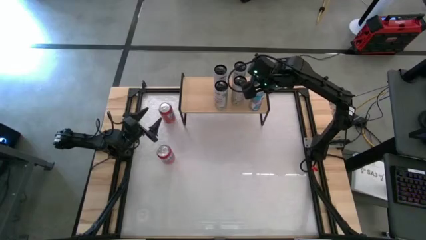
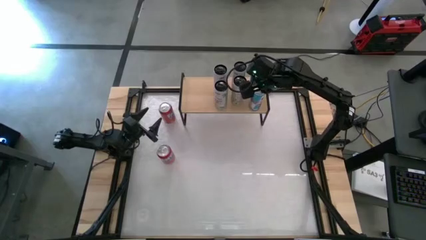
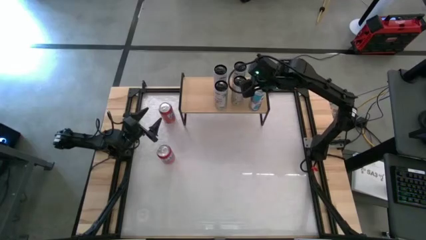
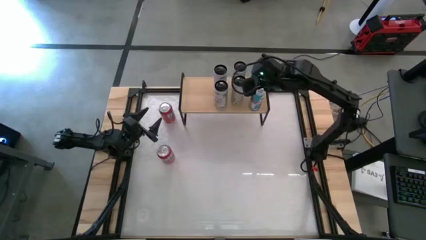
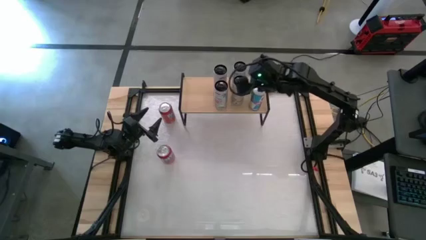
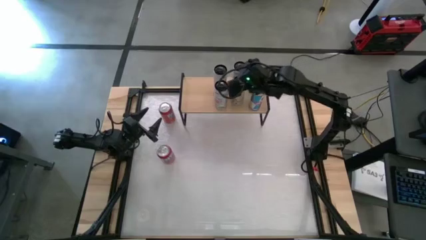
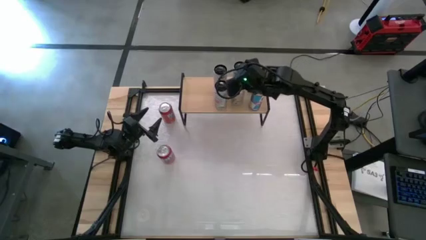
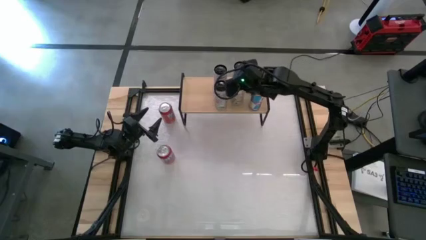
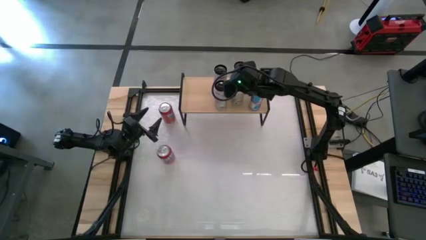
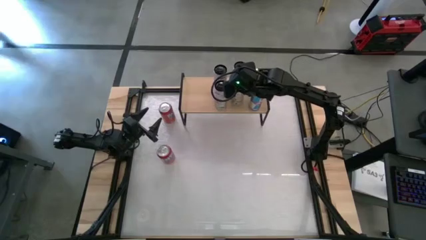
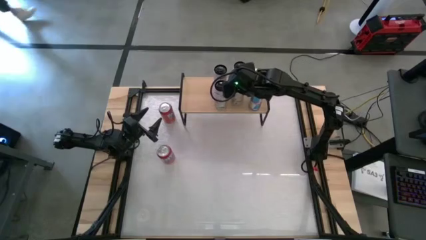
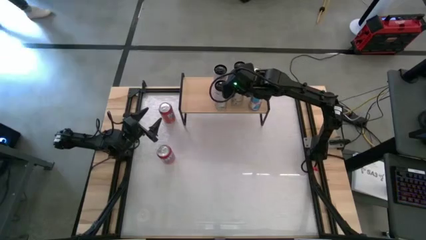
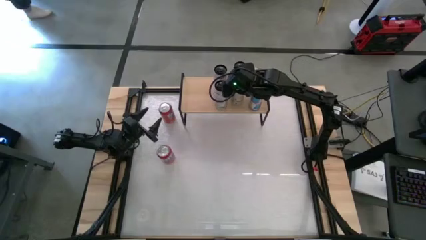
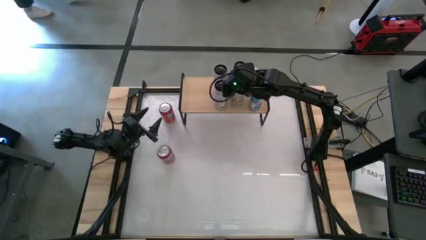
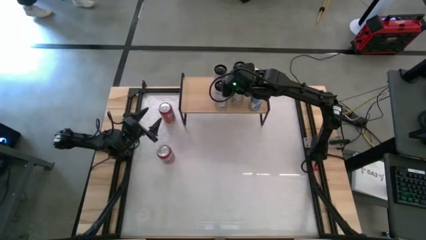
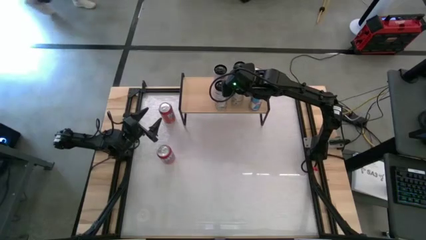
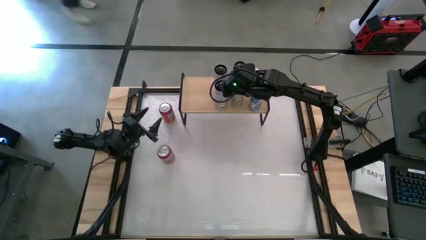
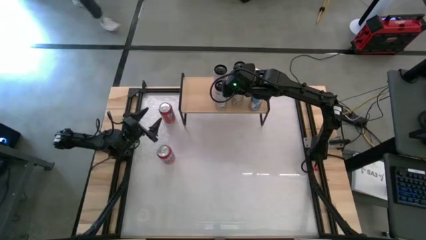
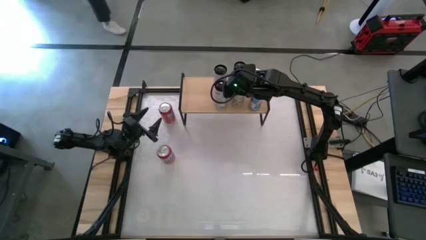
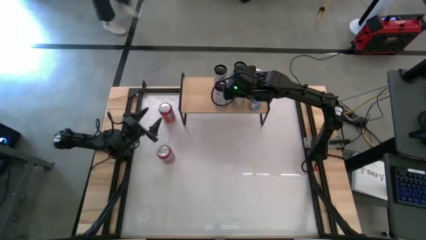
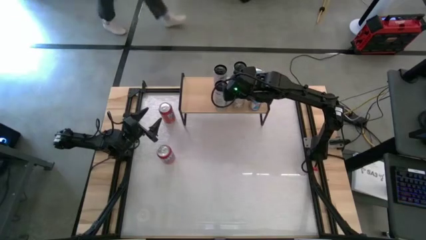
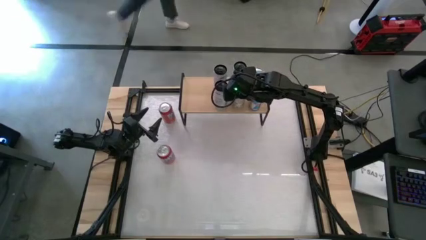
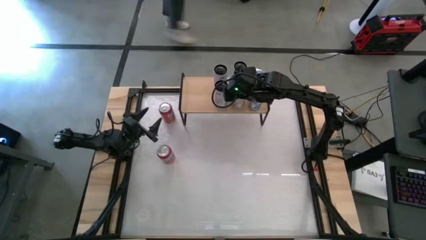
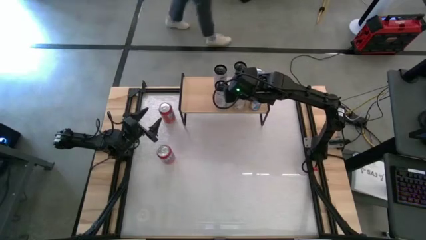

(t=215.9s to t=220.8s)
Task: Place canned beverage on shelf
Adjust the white yellow soda can

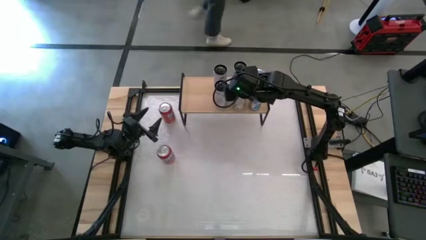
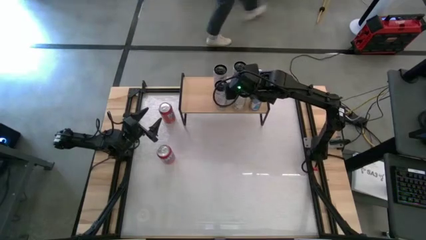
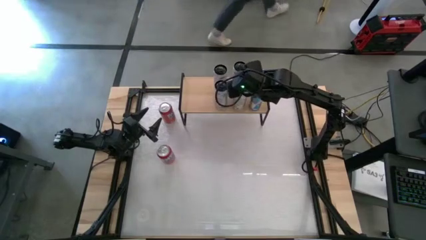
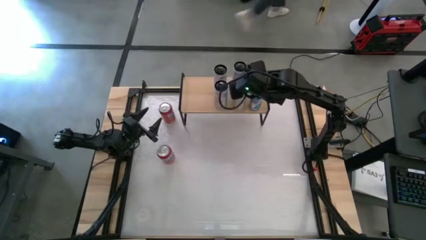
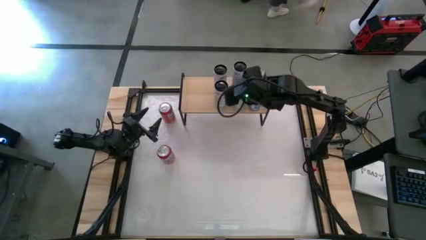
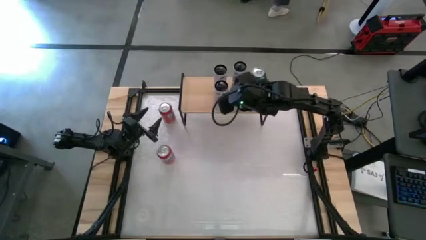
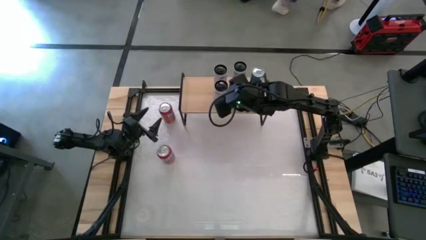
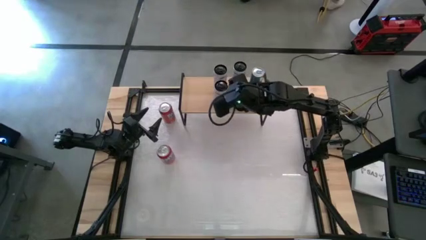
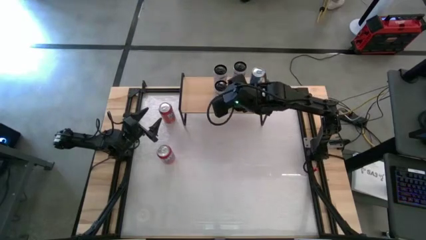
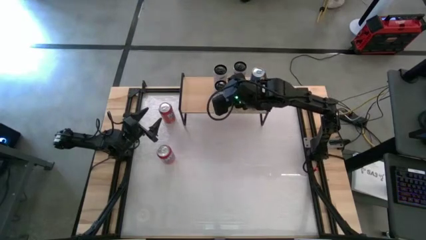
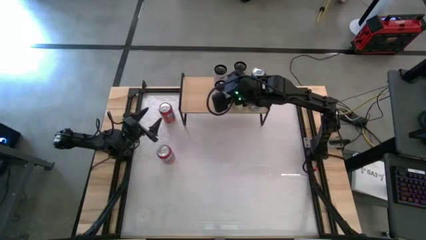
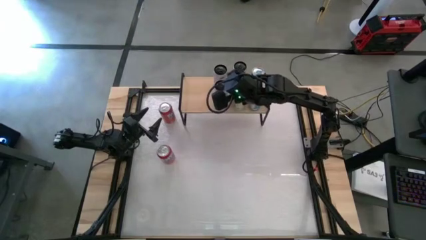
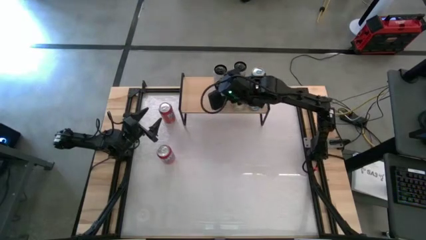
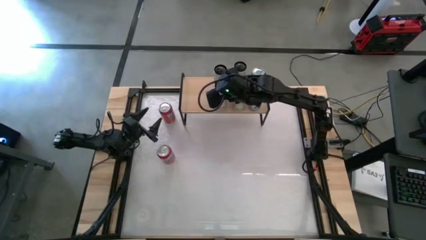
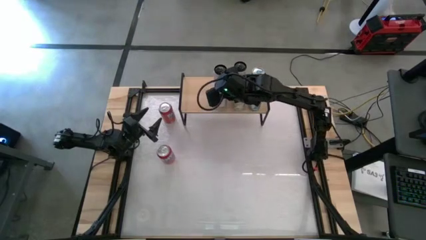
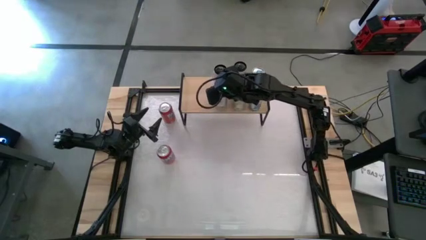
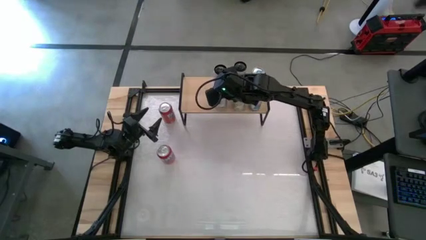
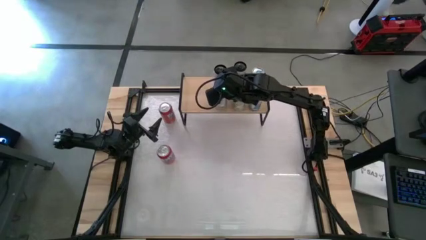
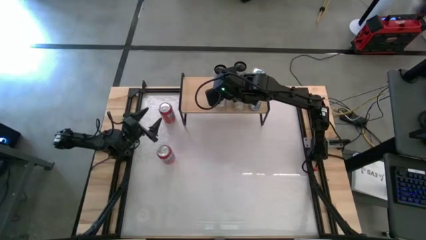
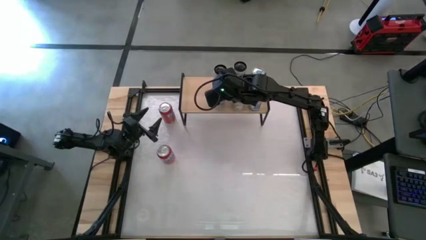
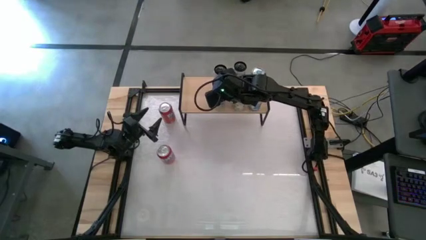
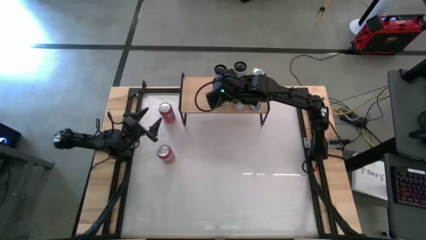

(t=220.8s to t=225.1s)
Adjust the white pink soda can

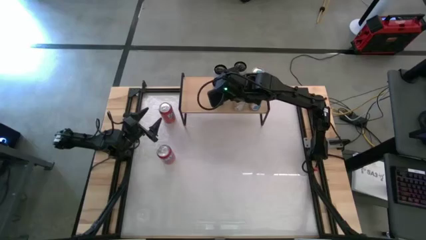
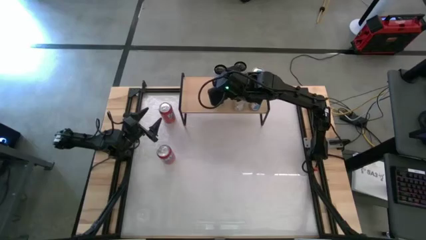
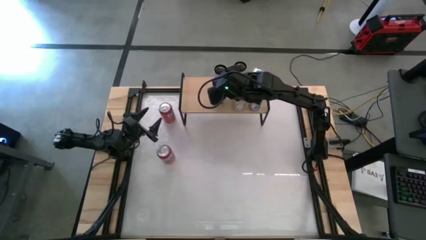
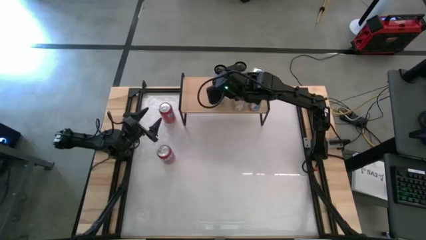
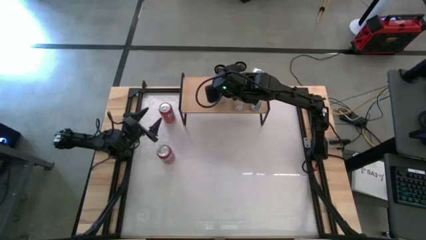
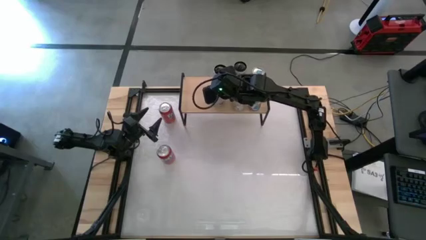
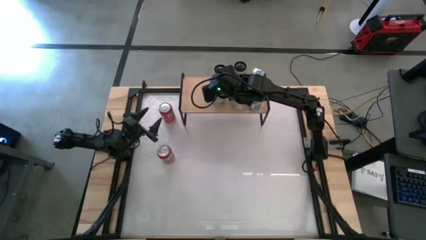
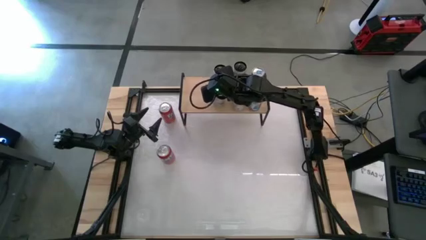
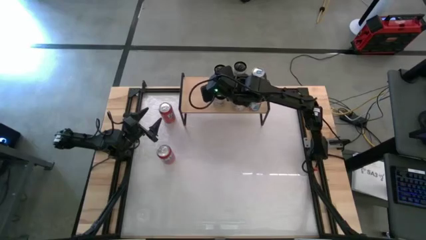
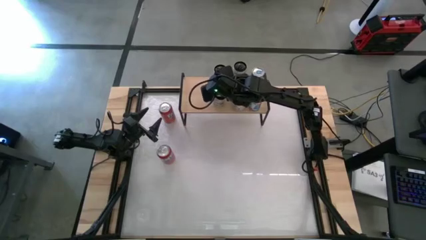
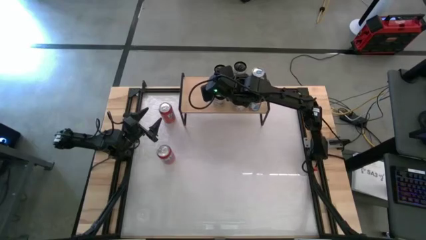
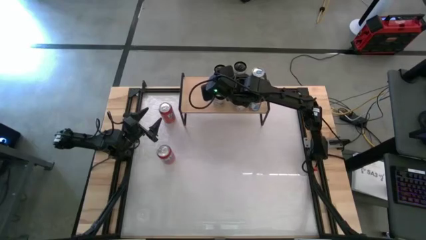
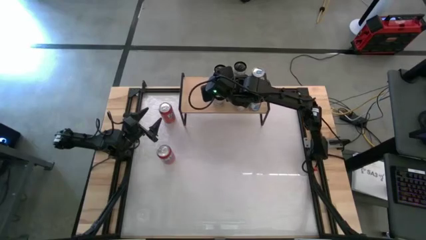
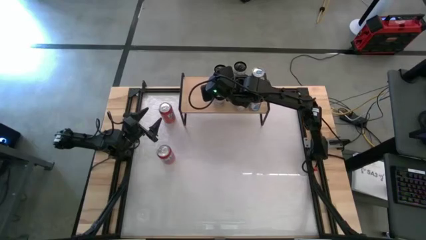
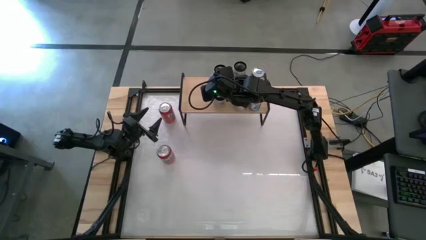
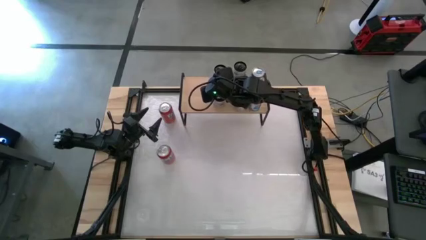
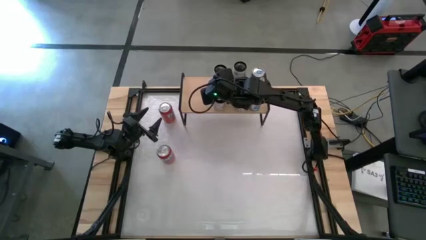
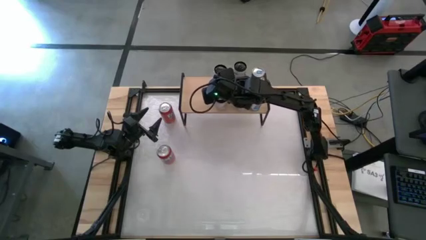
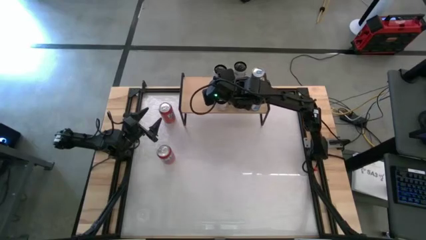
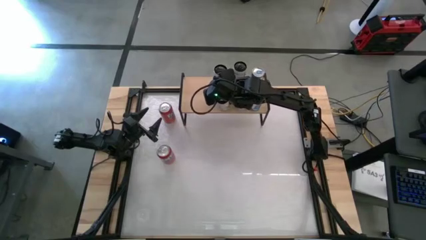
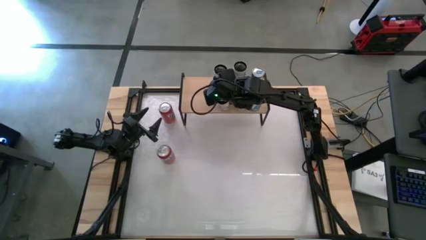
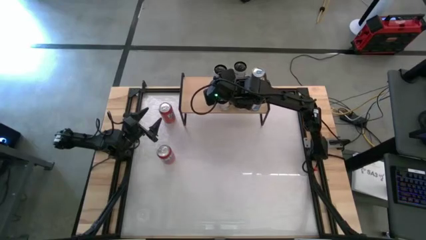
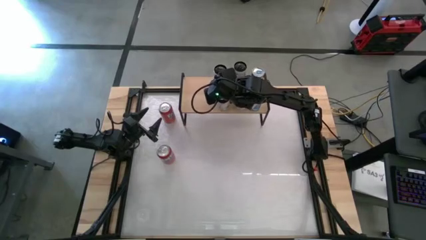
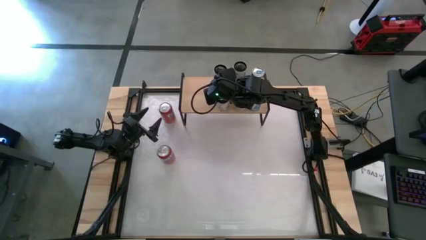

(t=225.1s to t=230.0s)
Adjust the white pink soda can

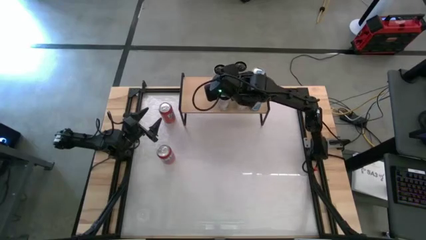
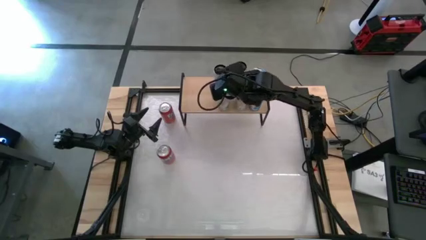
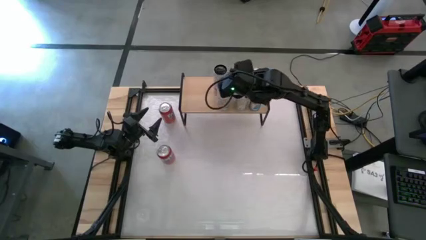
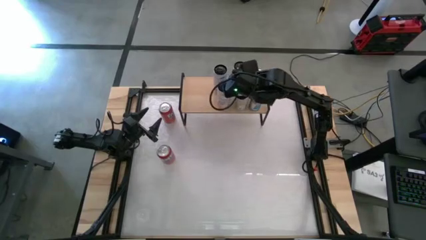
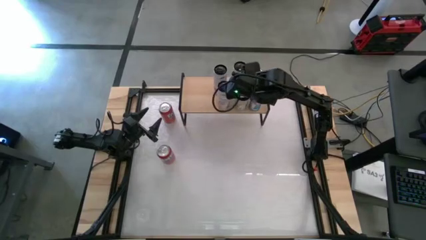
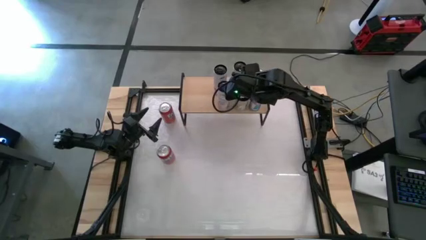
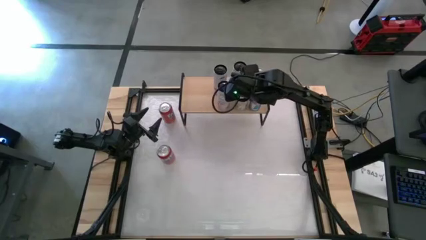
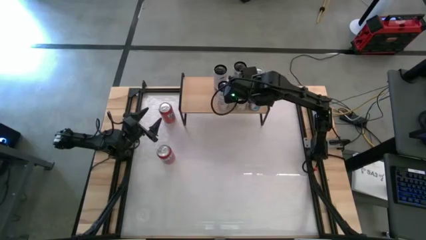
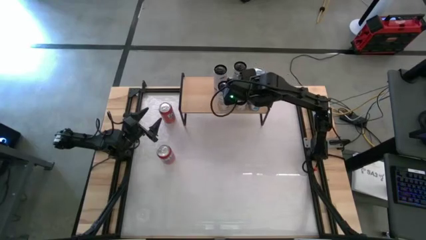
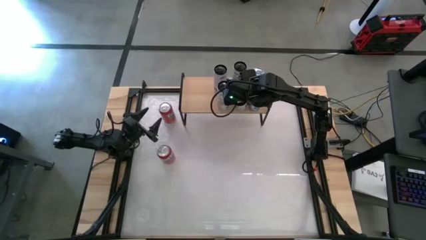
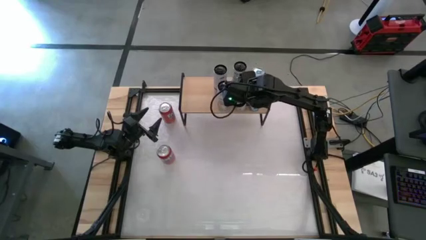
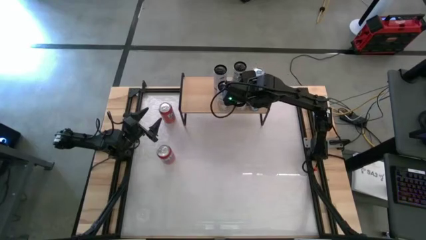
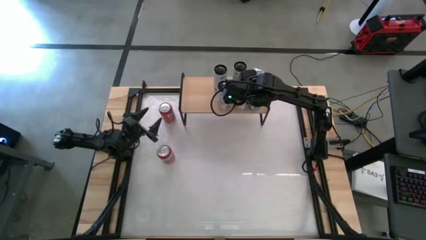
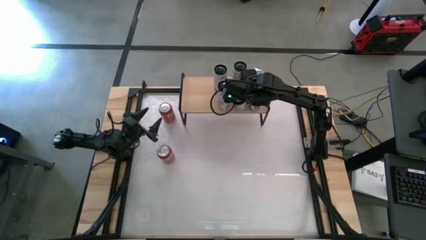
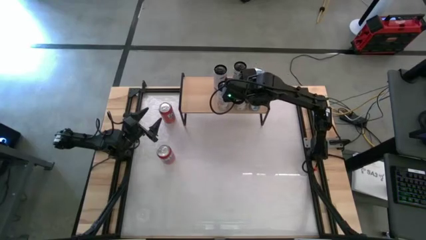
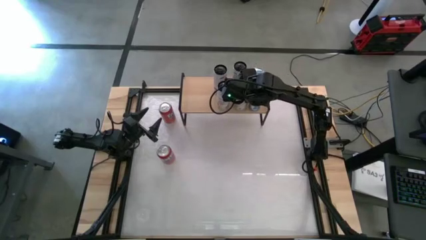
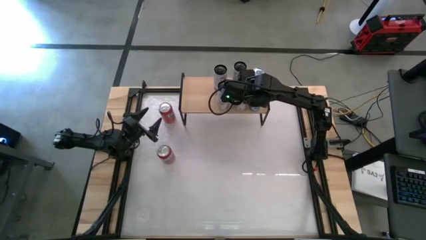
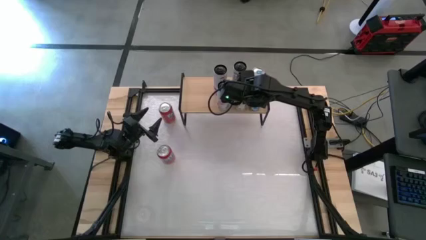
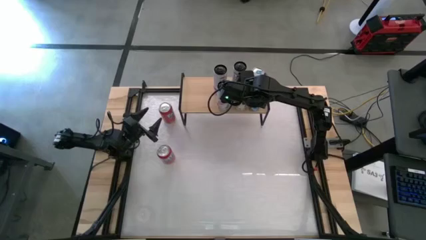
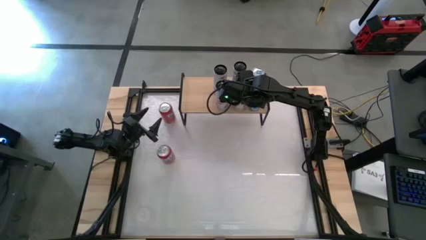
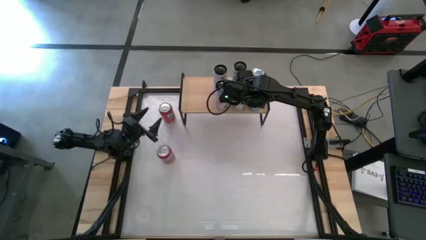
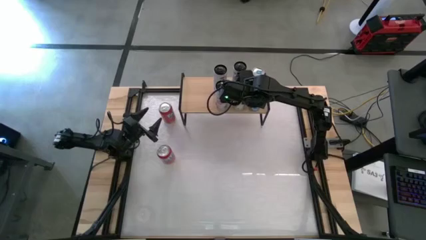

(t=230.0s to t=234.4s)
Adjust the white yellow soda can
